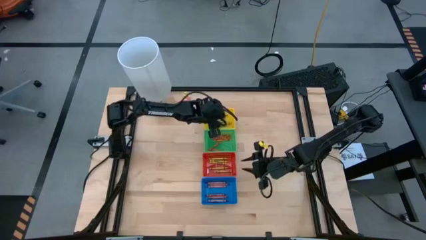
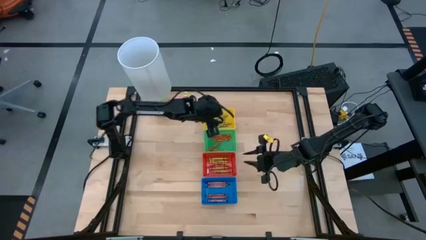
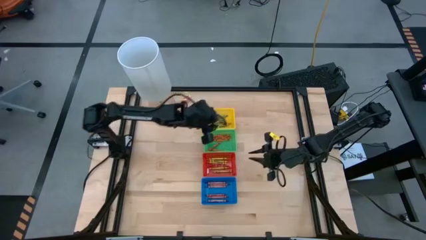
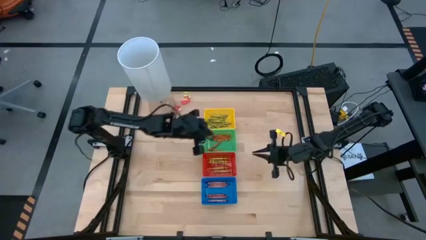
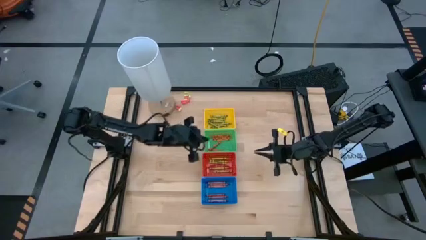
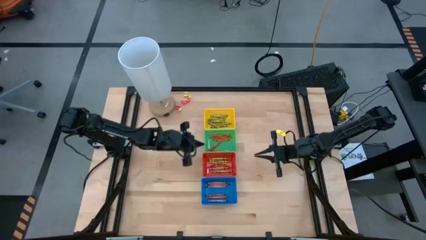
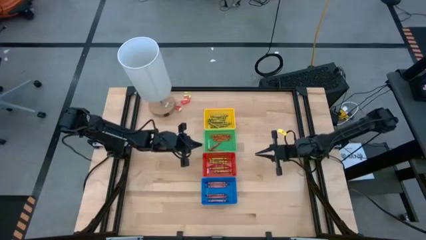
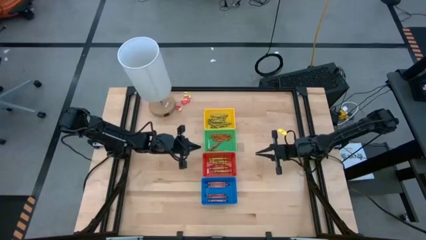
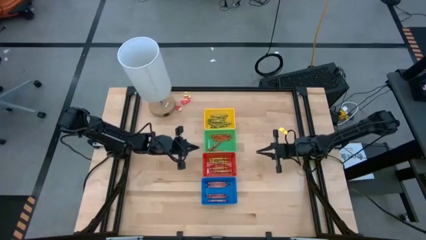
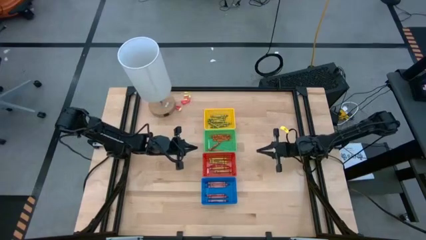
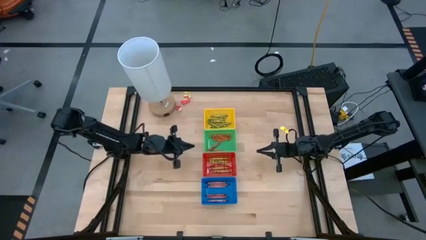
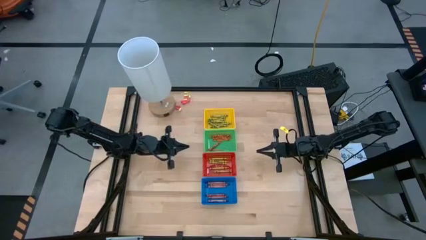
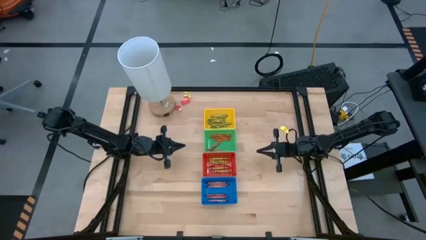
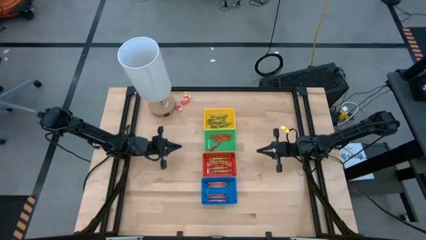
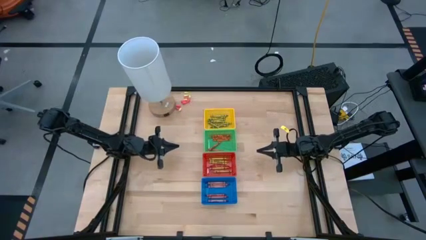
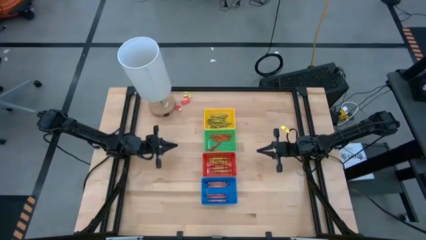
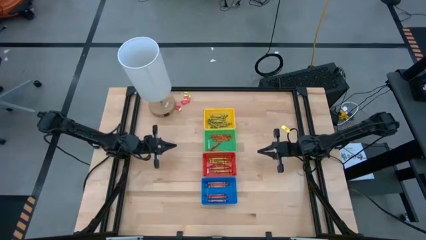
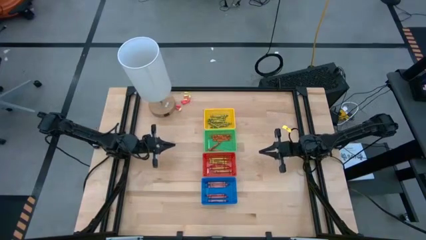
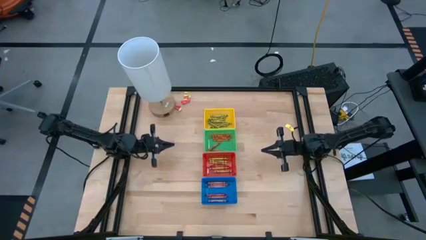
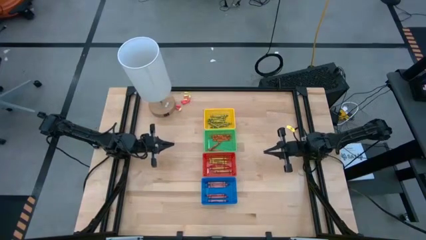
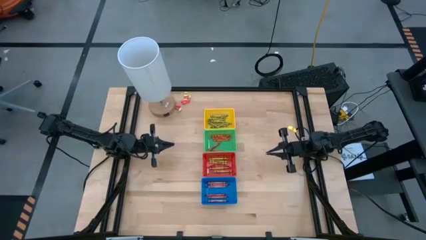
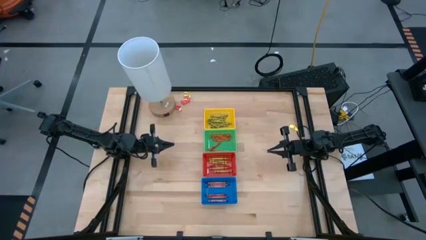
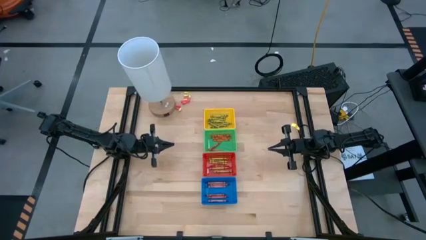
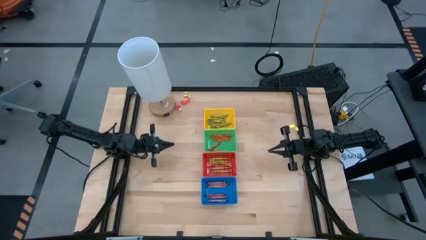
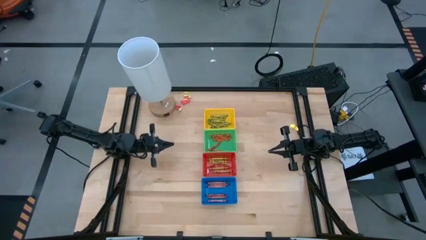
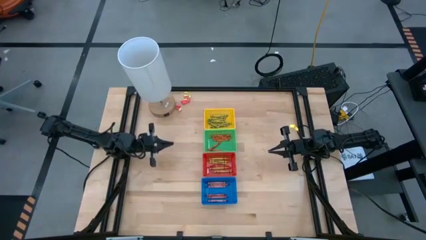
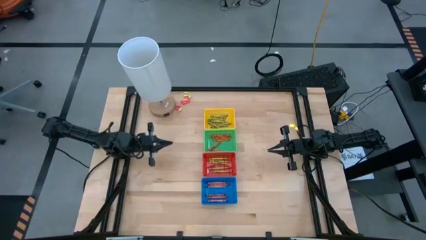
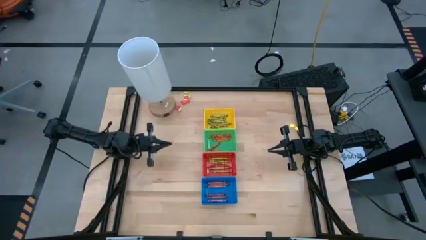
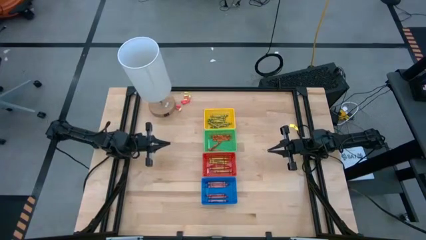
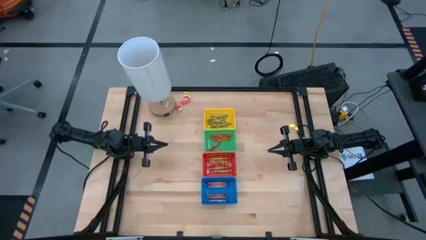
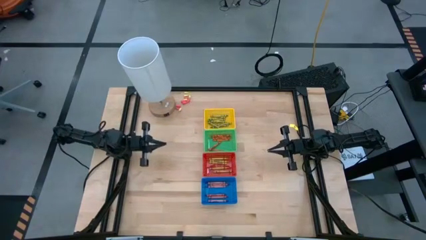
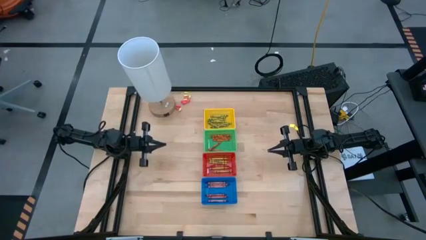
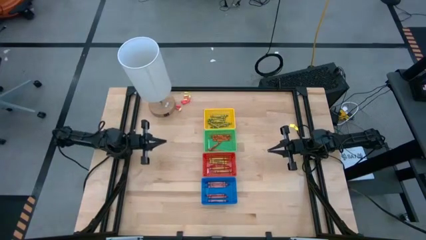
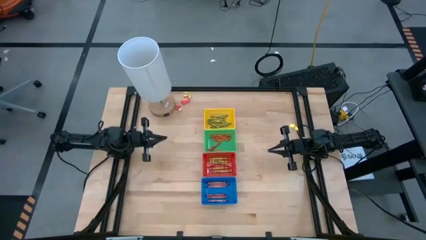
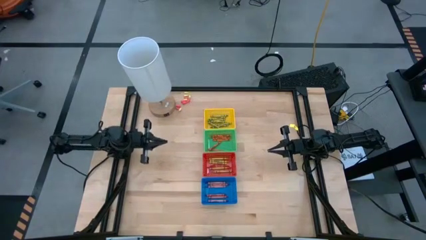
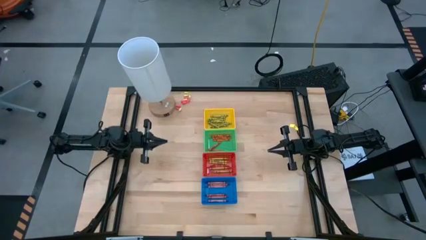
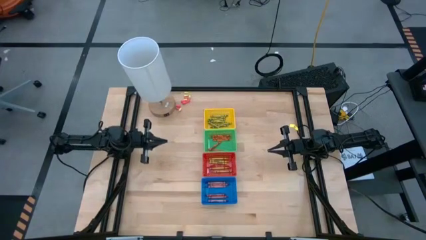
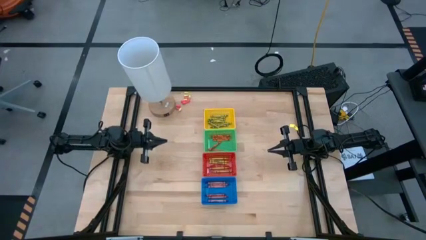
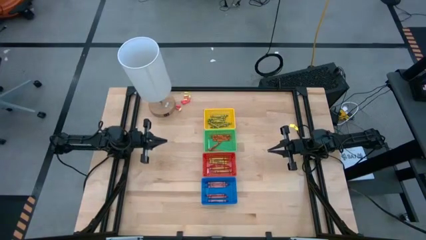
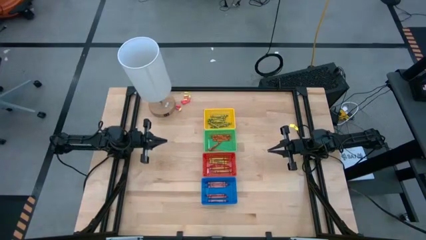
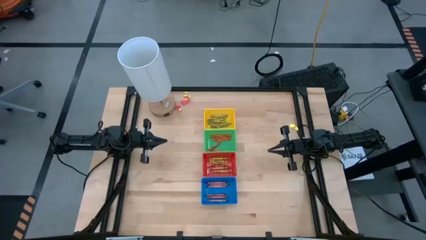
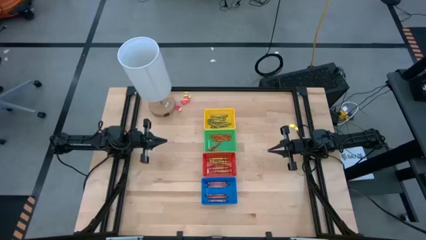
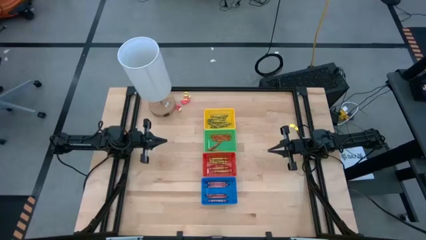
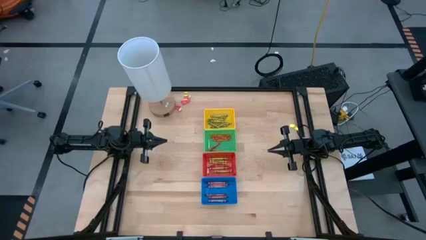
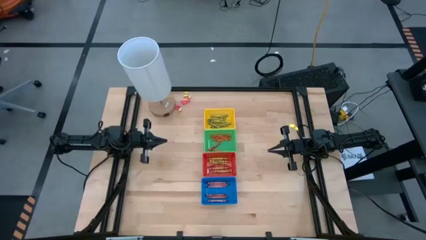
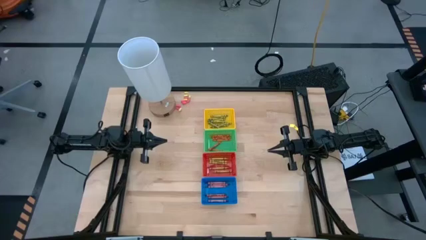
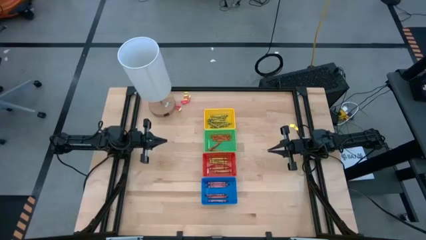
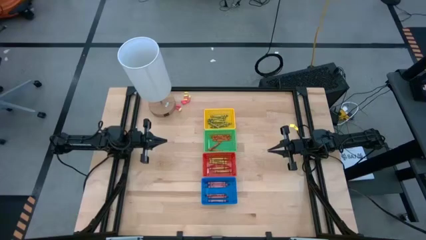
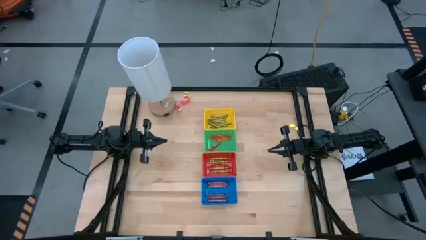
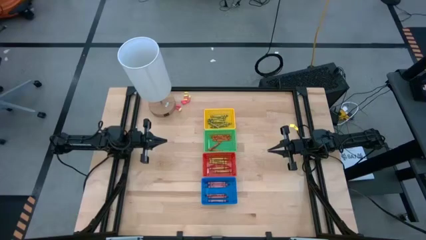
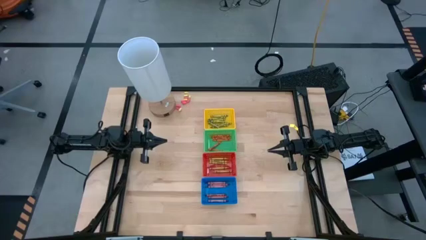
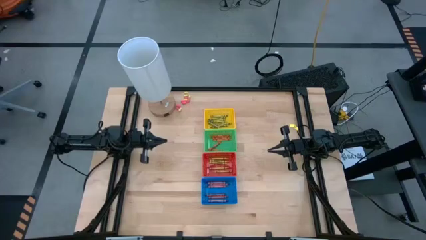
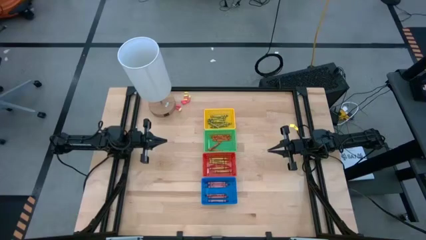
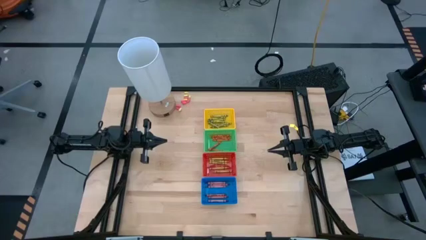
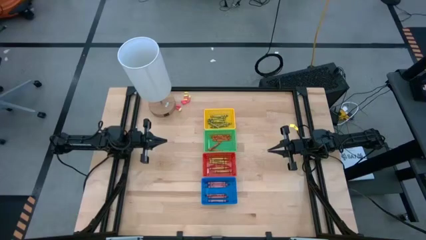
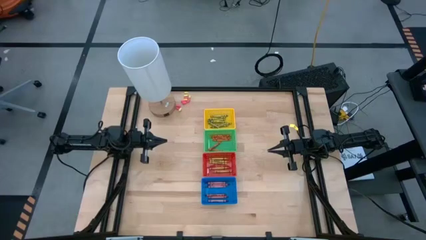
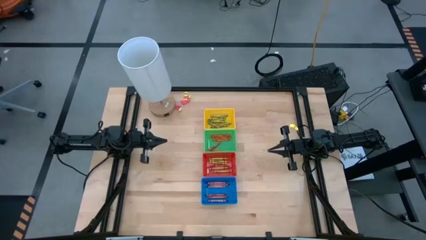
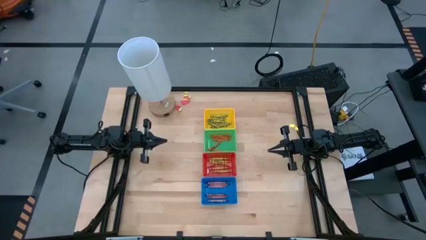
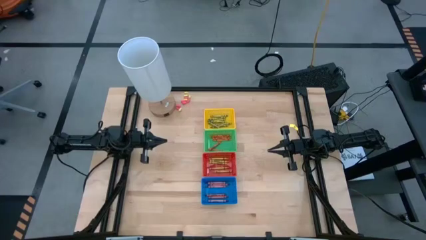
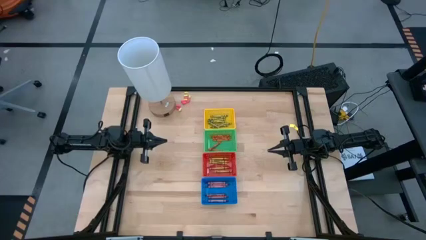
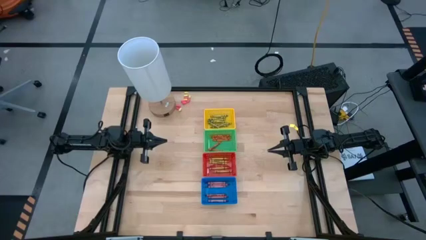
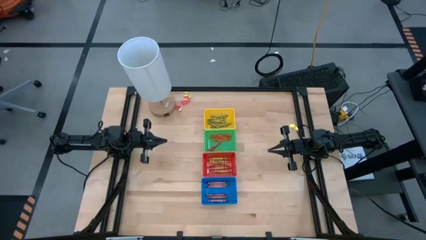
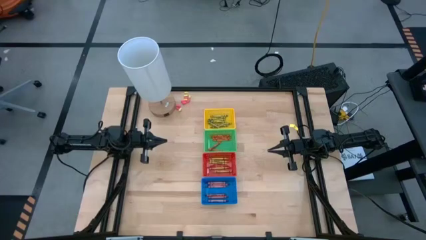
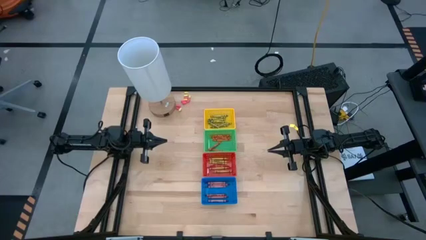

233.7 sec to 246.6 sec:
Task: Sort crayons
Return to Home Position

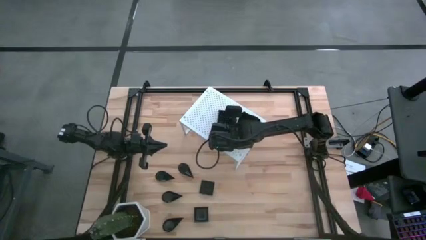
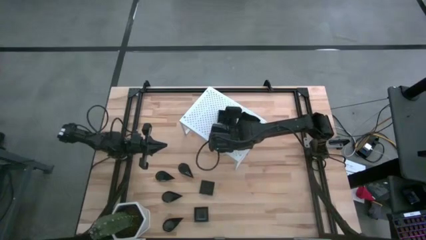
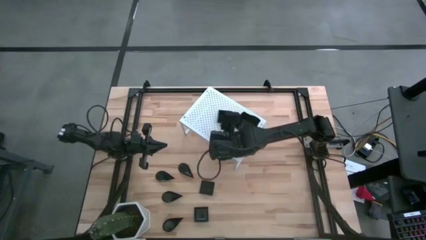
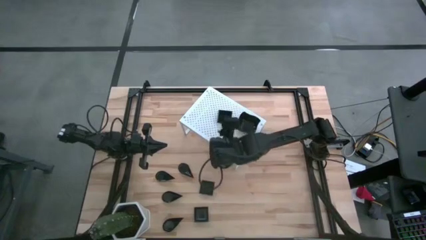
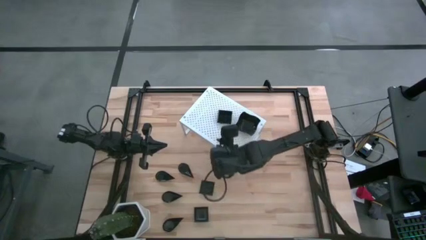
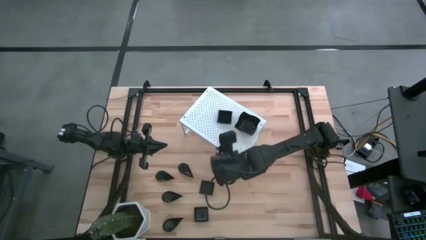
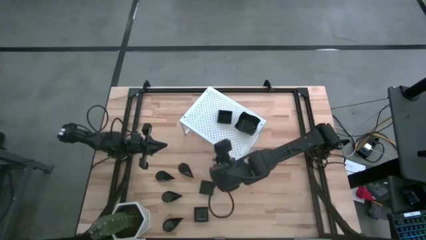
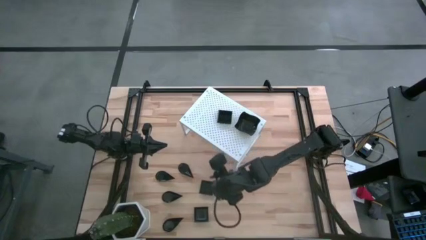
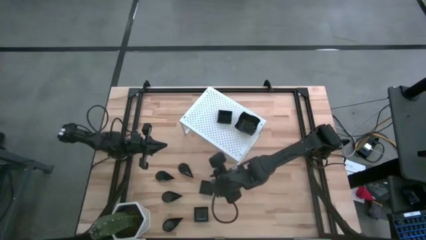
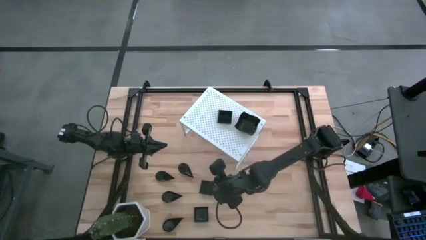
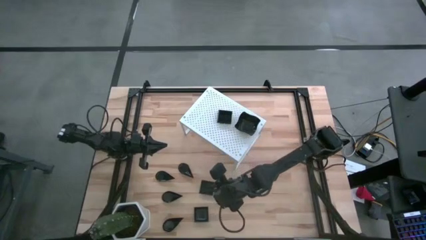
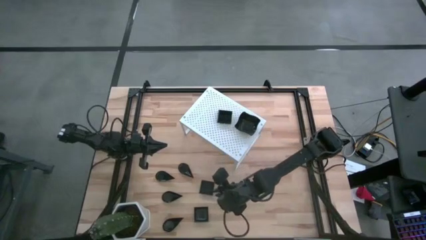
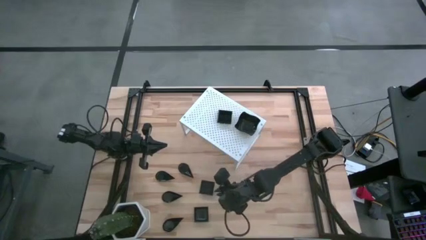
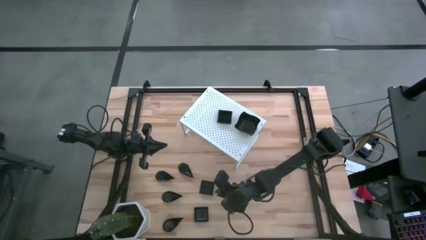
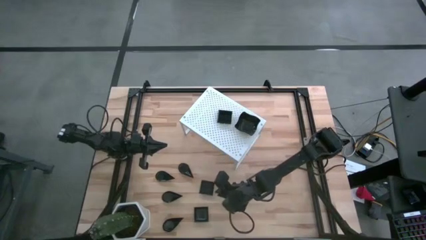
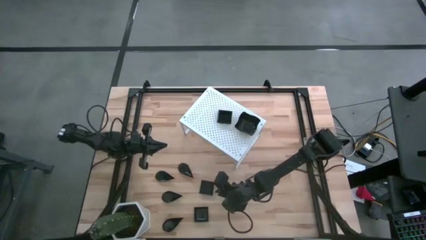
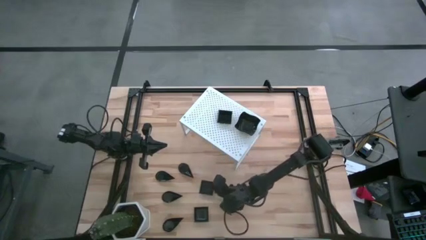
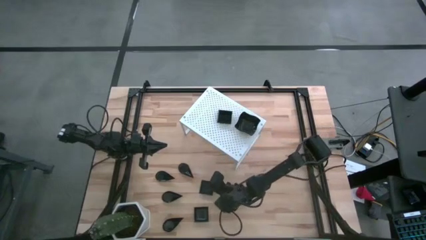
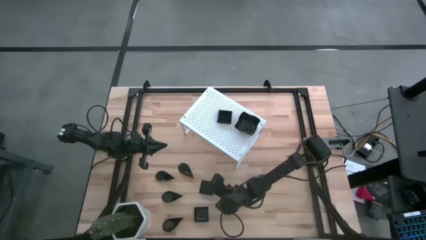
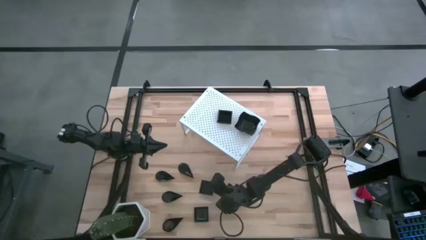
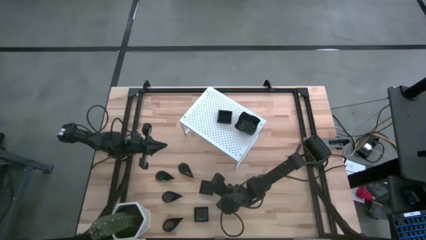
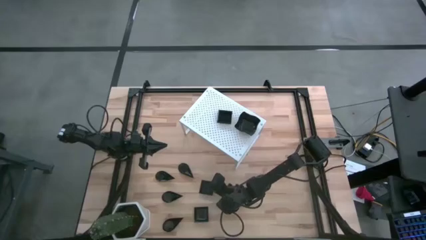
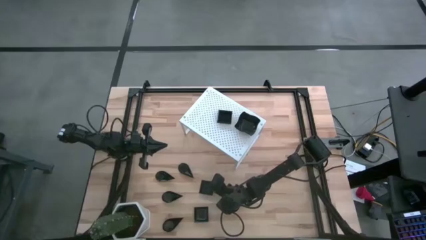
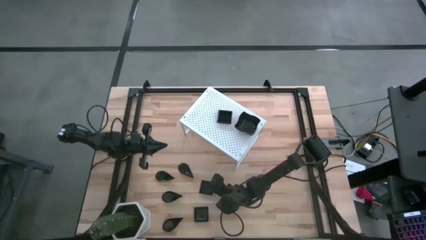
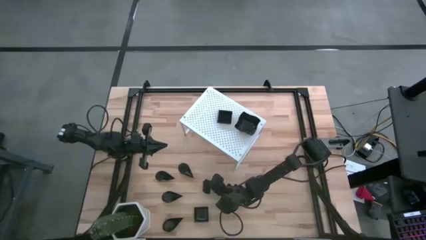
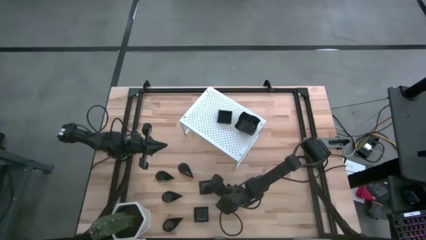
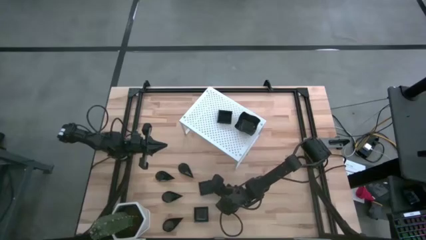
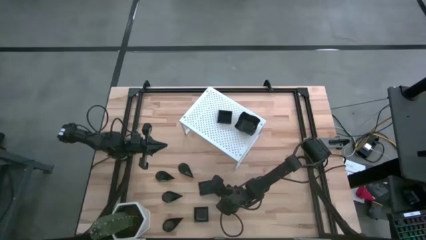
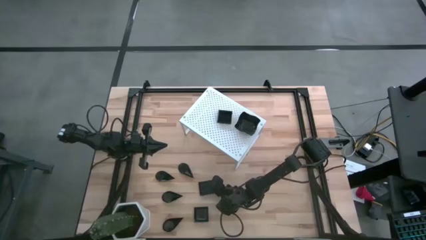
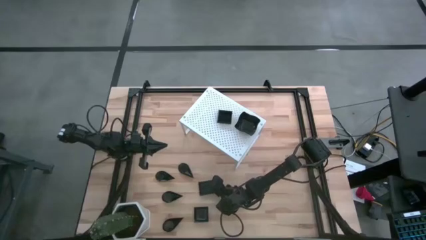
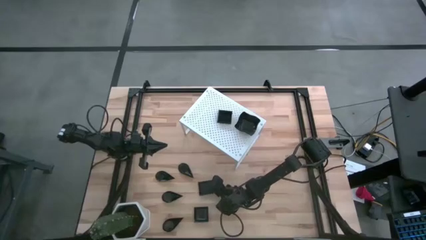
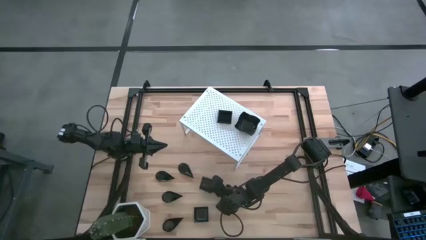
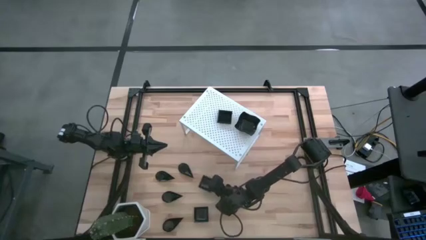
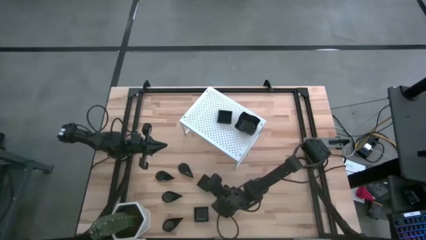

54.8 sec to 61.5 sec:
Task: Pick & Place Mini shaped plates
Stack the square plate on top of the other square plates on the shelf
